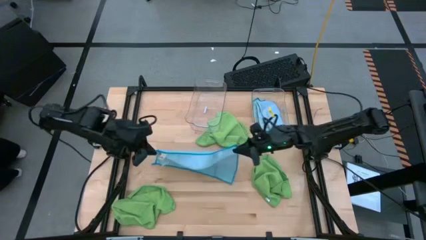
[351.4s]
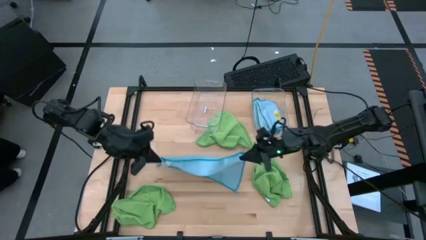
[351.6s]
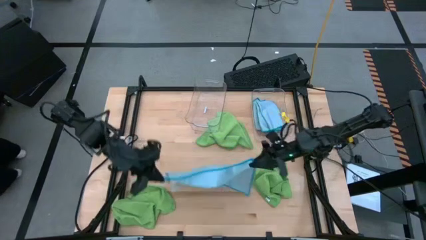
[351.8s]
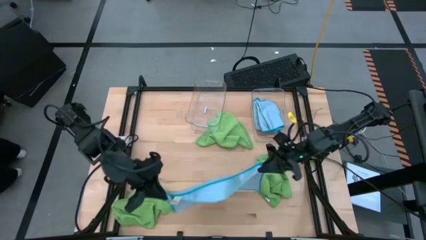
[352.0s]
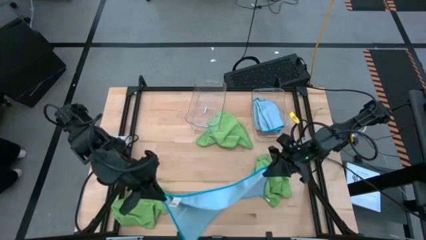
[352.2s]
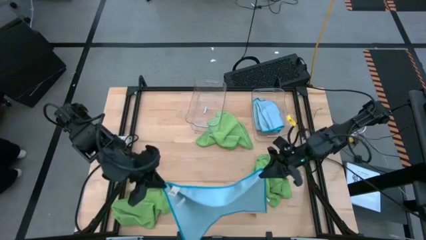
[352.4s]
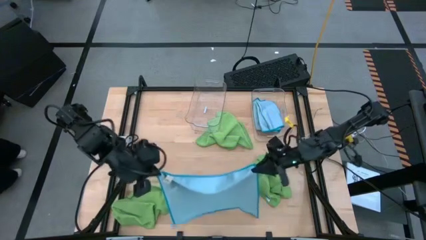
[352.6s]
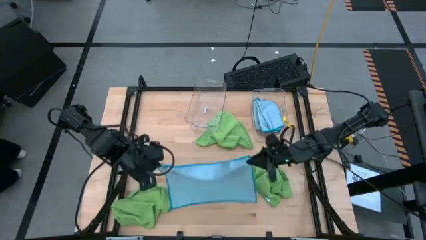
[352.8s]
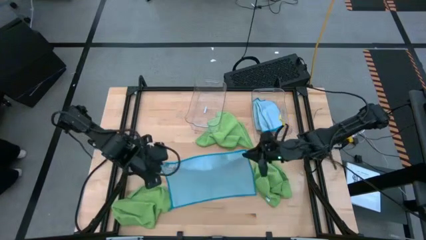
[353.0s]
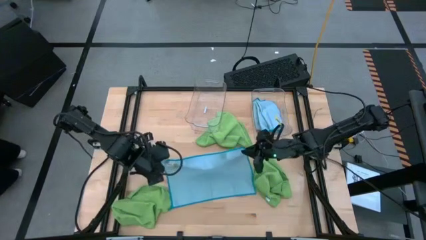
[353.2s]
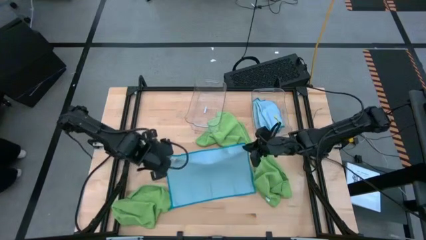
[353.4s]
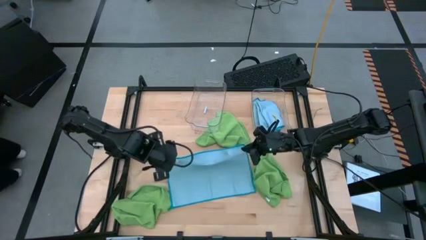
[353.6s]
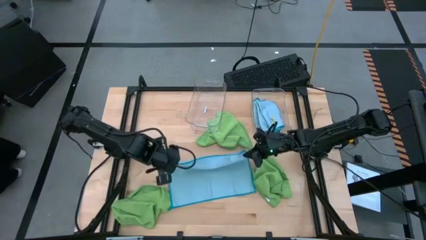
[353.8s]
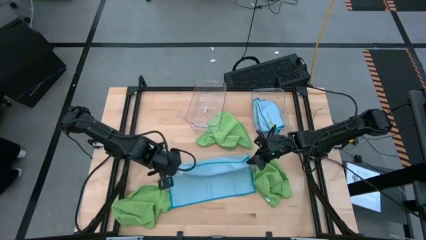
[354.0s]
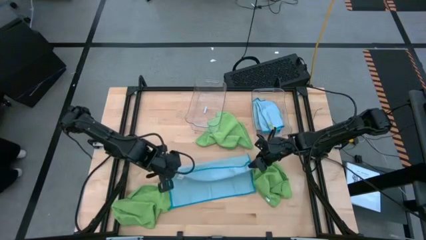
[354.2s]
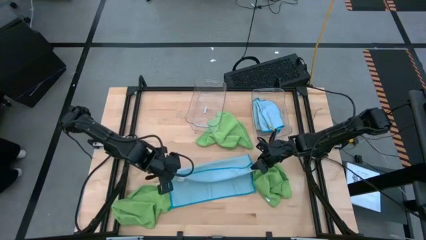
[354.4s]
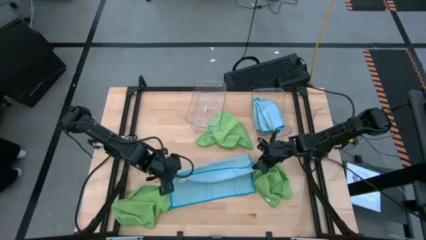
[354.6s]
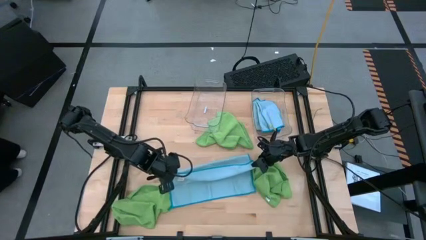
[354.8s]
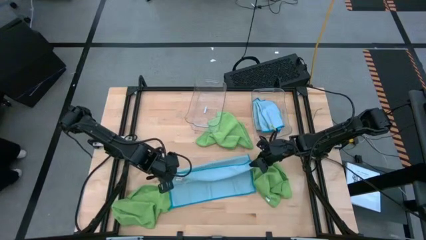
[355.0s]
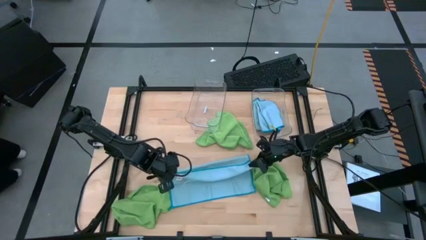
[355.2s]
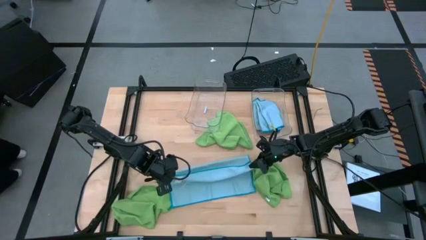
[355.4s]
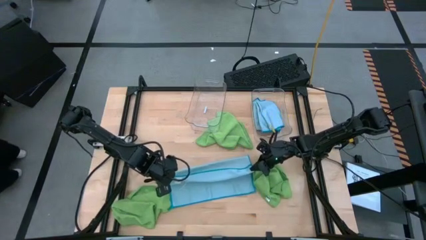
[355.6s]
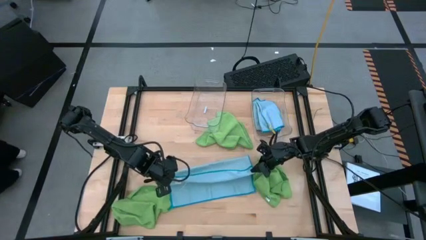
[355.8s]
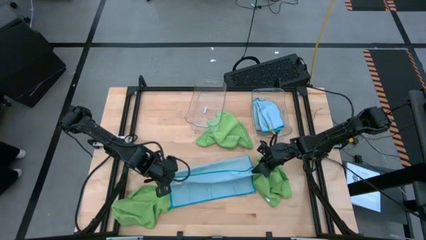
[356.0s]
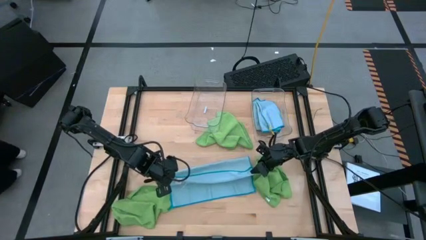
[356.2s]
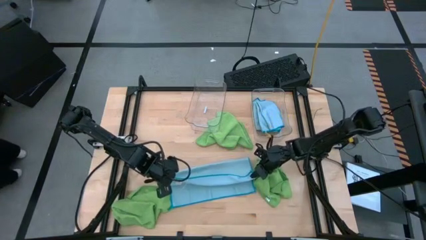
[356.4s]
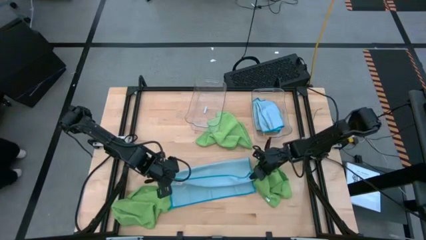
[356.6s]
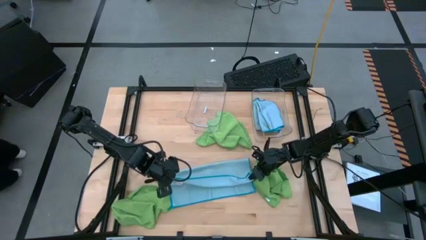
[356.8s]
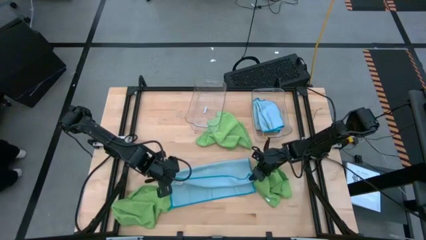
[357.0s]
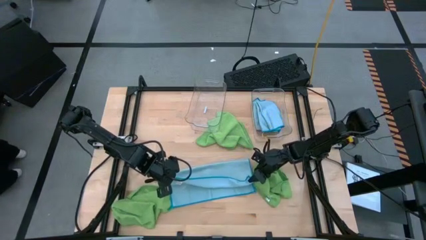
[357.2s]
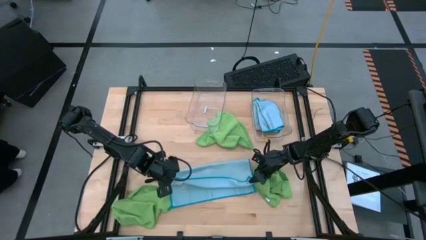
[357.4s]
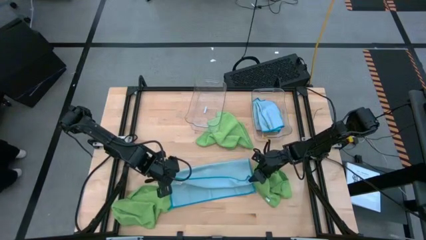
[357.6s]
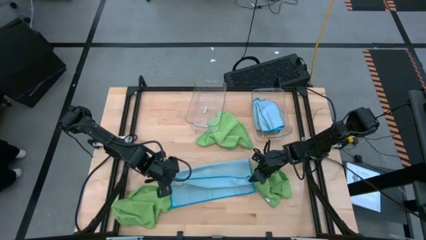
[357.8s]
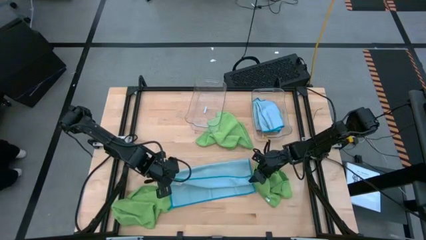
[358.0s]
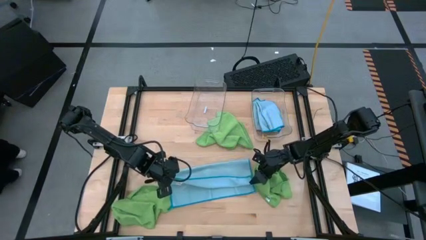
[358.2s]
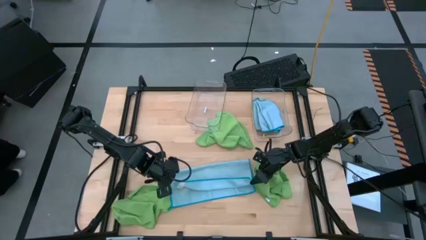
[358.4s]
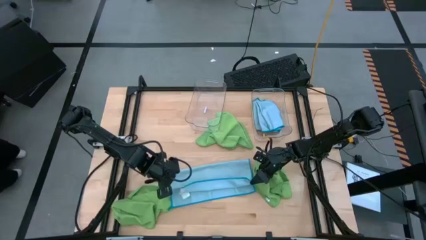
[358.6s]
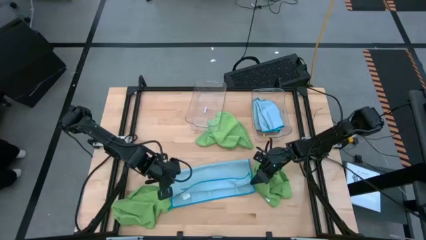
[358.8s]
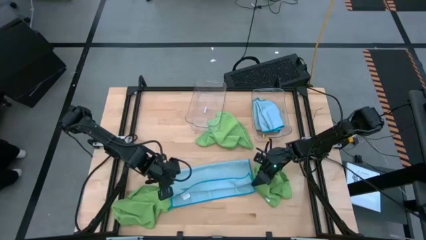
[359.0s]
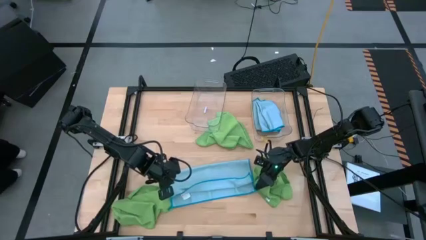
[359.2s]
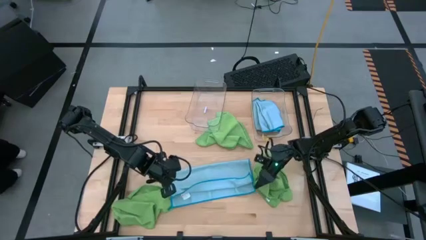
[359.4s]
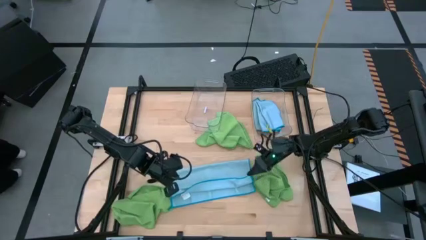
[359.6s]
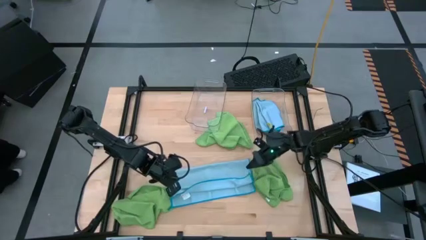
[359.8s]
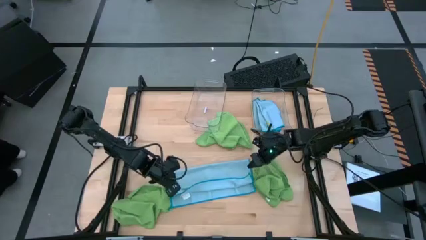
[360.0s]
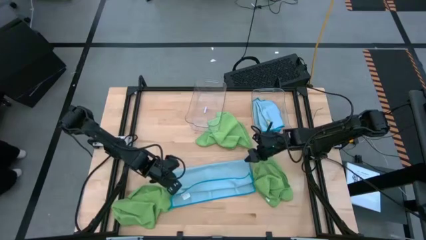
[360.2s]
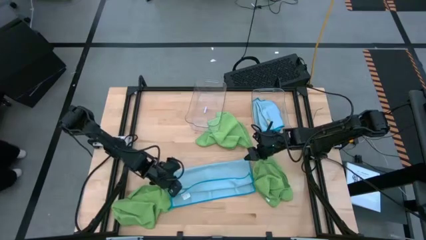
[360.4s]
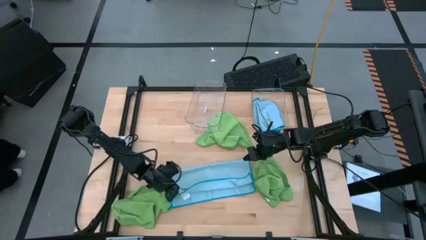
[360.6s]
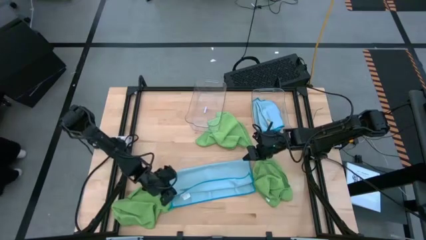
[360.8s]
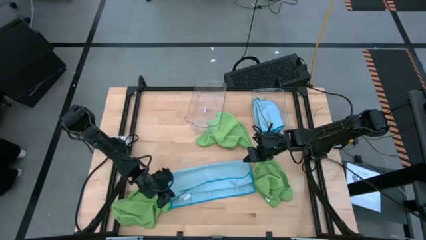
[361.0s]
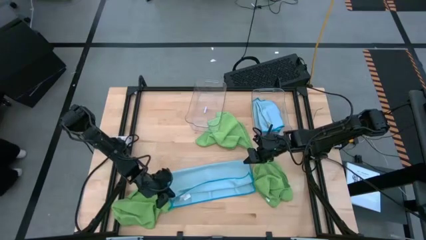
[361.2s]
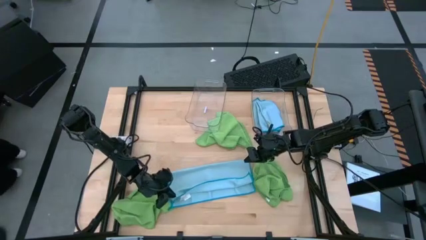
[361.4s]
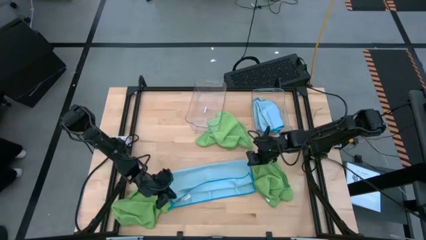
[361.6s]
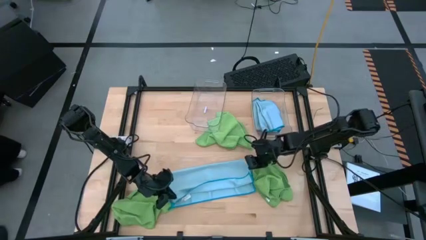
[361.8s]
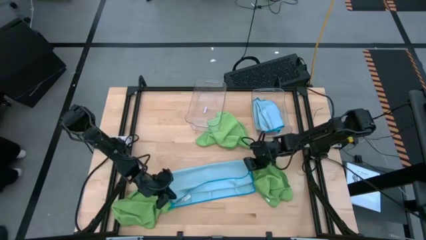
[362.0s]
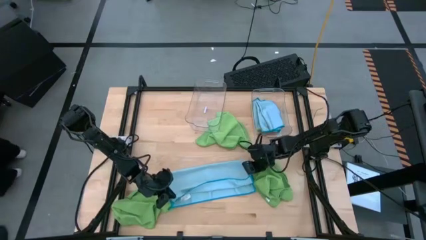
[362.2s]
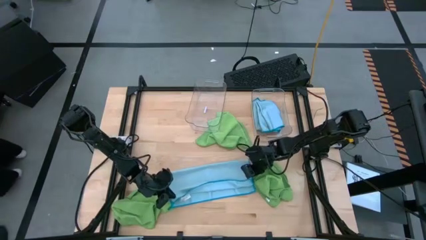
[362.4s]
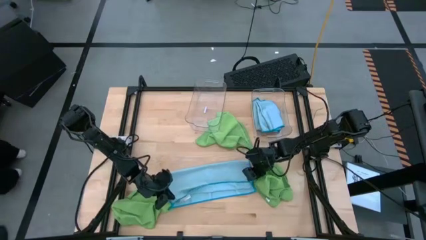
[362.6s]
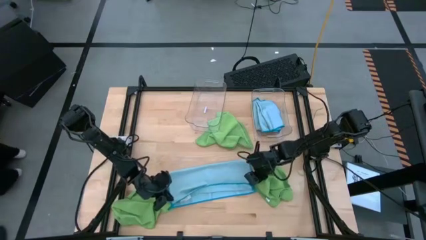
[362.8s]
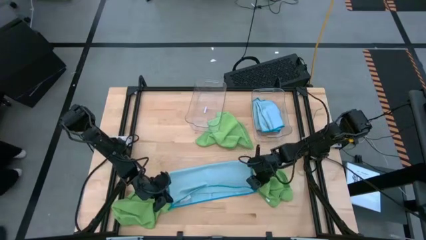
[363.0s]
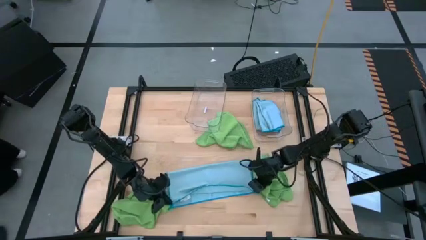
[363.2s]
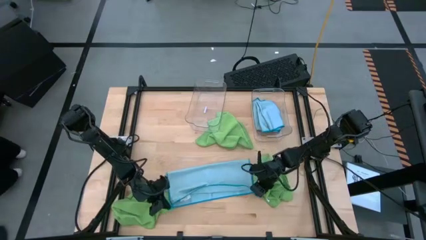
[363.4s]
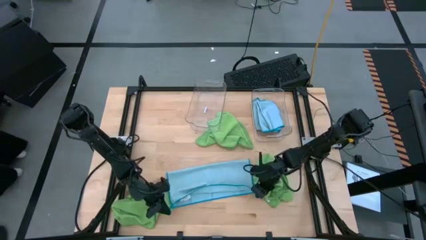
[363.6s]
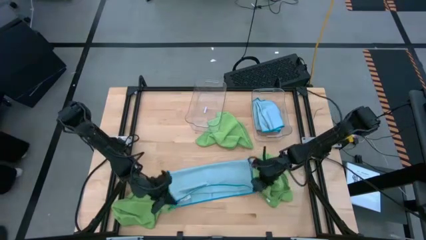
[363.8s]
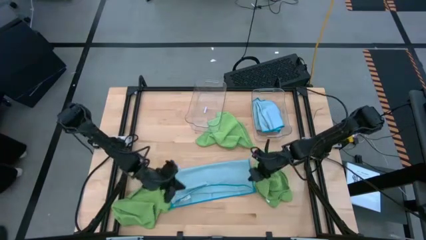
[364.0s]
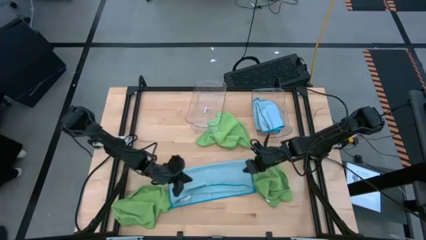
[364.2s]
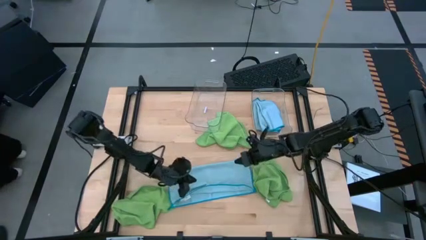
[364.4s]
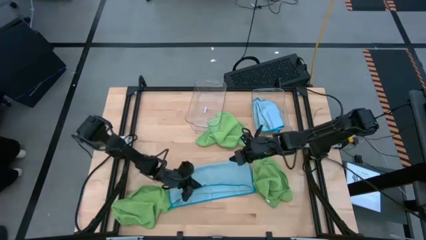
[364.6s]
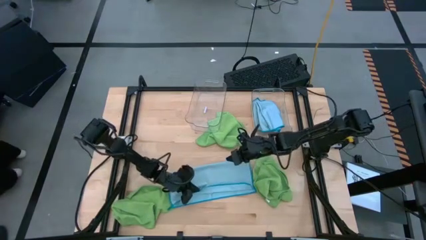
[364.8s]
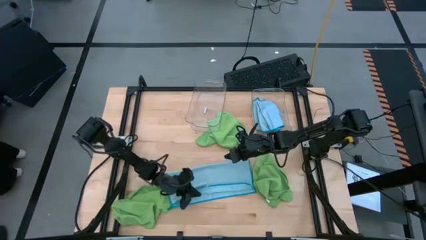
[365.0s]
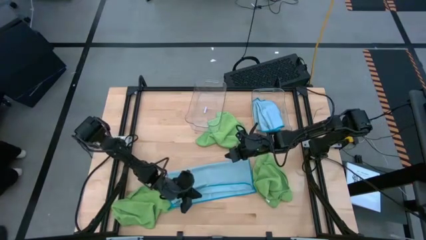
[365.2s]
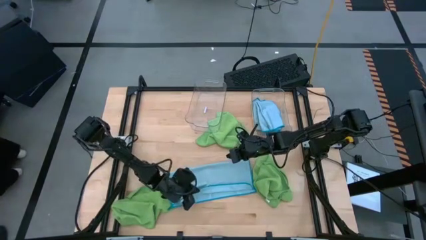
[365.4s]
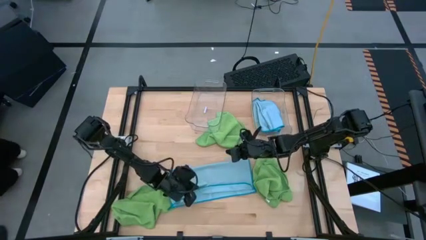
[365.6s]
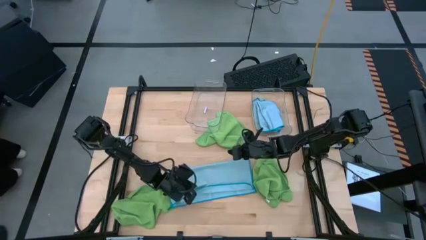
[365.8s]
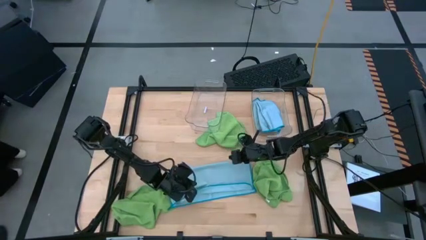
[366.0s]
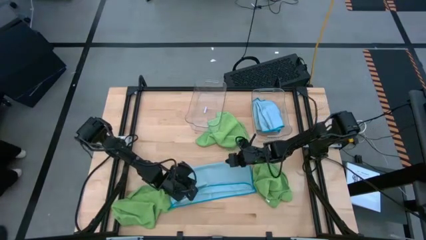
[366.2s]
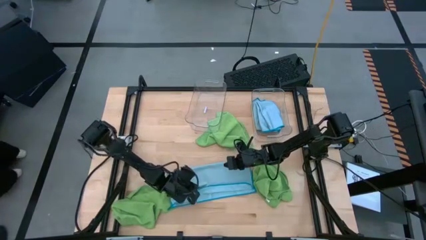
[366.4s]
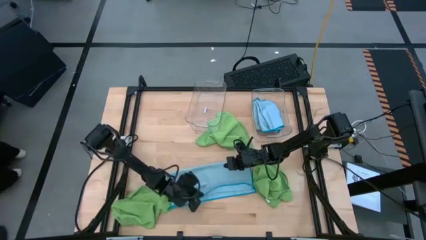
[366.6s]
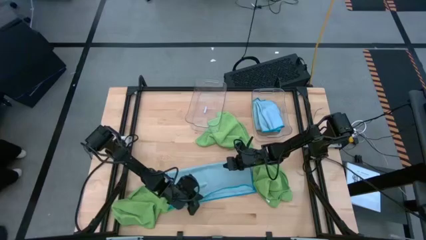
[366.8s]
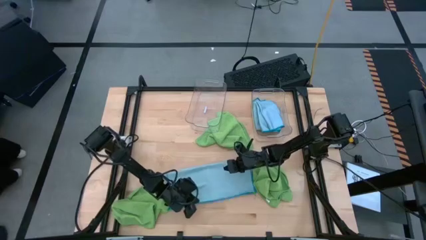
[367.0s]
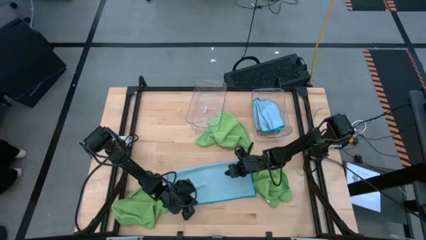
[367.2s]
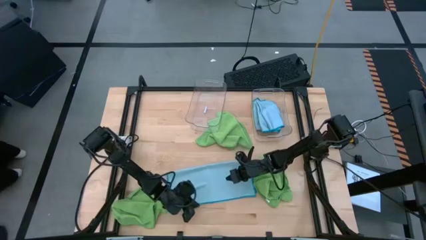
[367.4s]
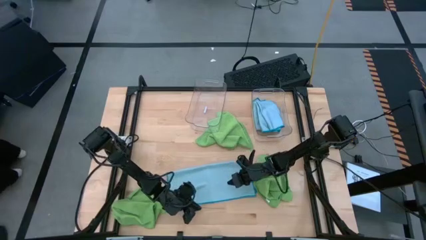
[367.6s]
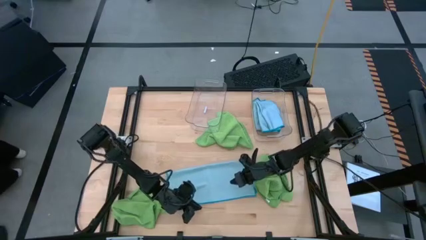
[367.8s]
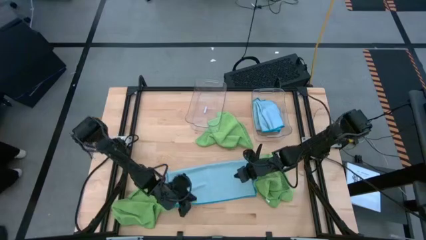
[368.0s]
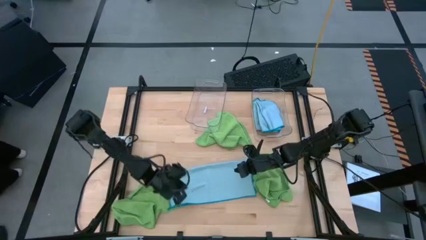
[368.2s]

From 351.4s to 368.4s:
Task: Fold microfiber towels
Fold the blue microfiber towel
